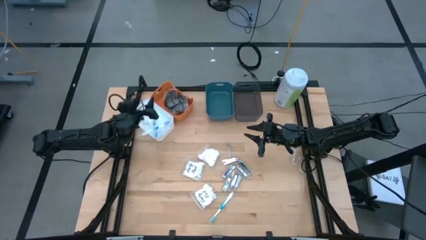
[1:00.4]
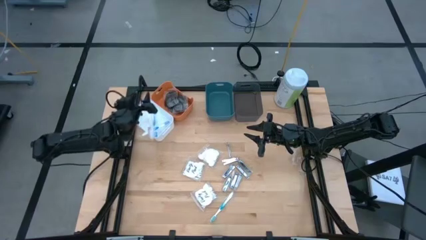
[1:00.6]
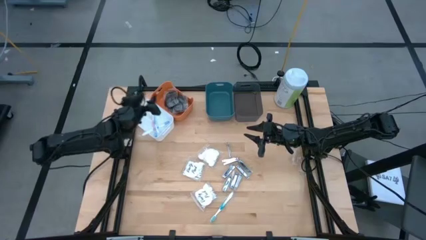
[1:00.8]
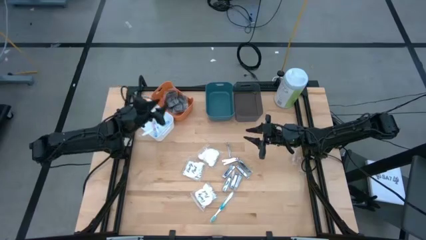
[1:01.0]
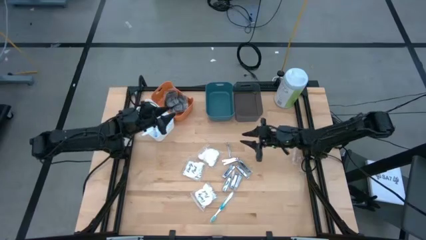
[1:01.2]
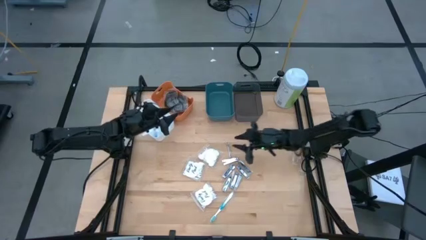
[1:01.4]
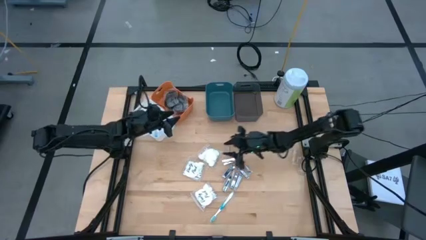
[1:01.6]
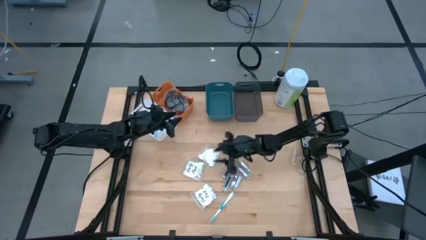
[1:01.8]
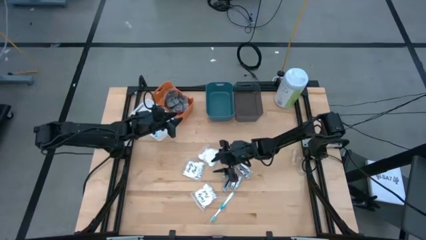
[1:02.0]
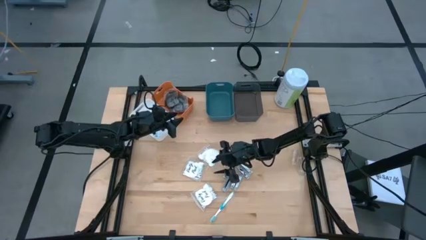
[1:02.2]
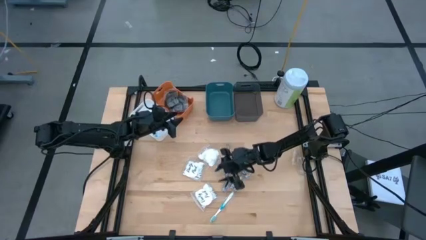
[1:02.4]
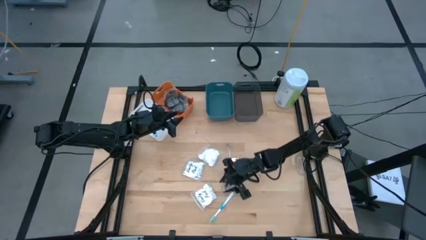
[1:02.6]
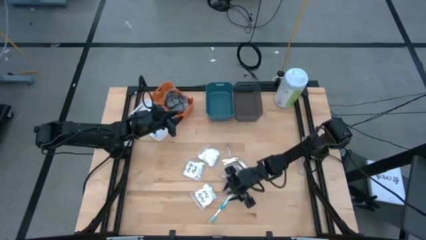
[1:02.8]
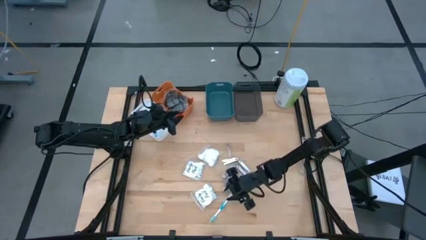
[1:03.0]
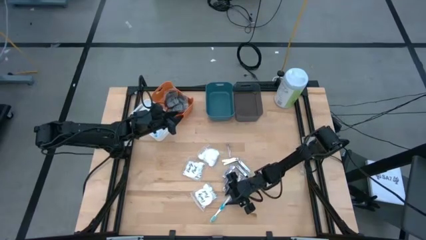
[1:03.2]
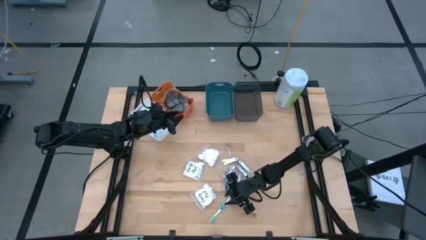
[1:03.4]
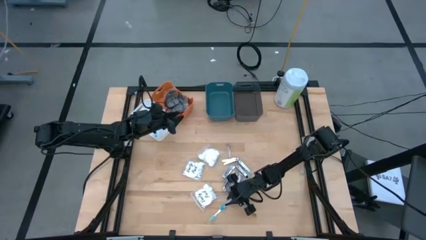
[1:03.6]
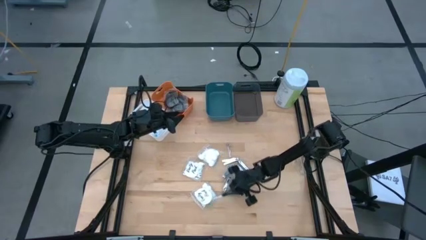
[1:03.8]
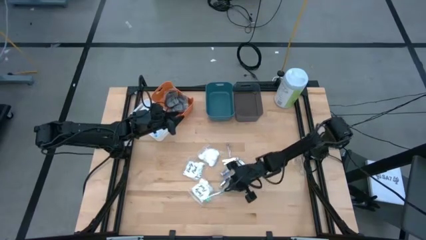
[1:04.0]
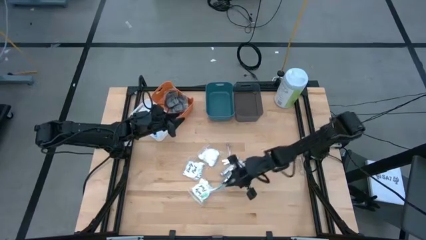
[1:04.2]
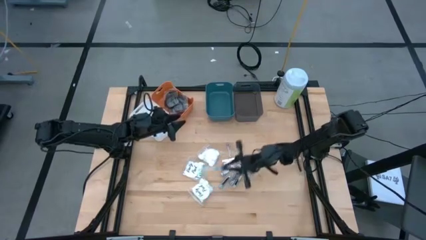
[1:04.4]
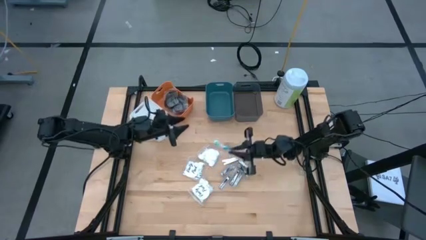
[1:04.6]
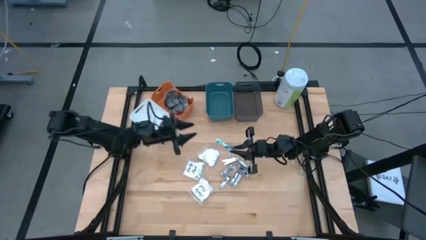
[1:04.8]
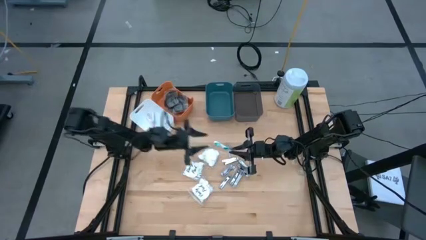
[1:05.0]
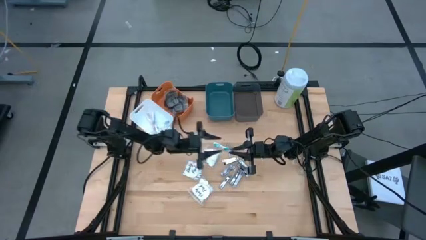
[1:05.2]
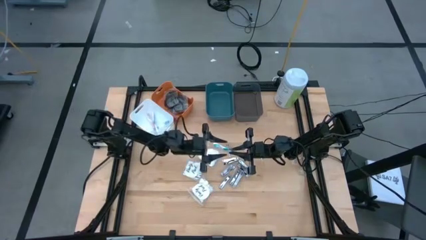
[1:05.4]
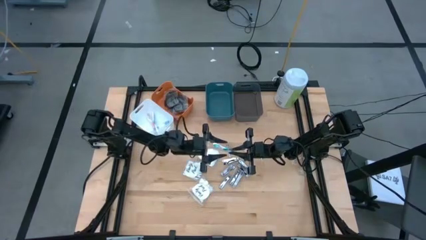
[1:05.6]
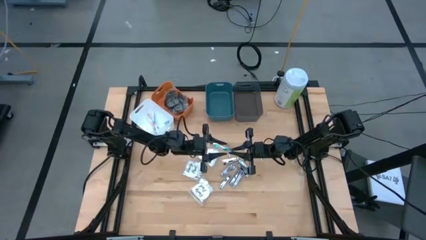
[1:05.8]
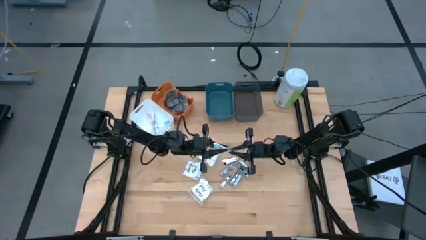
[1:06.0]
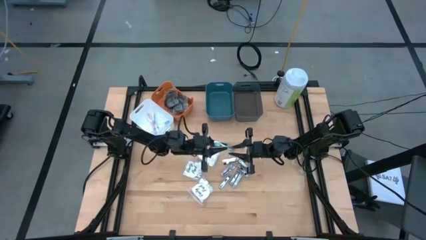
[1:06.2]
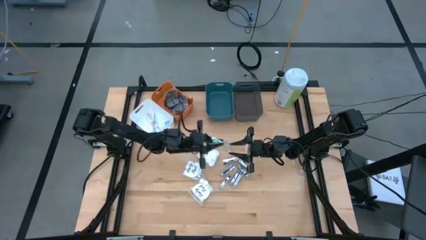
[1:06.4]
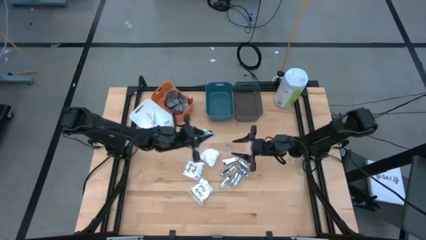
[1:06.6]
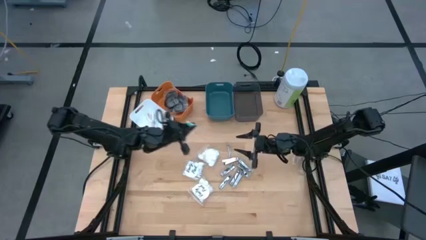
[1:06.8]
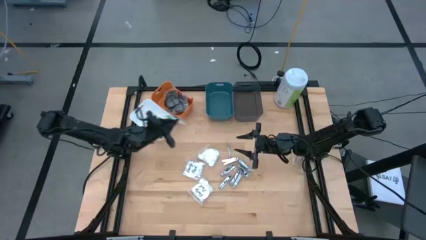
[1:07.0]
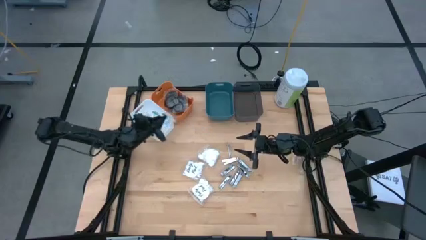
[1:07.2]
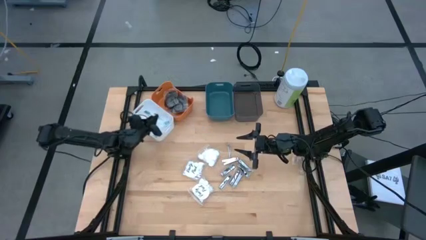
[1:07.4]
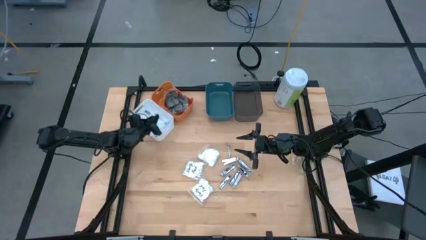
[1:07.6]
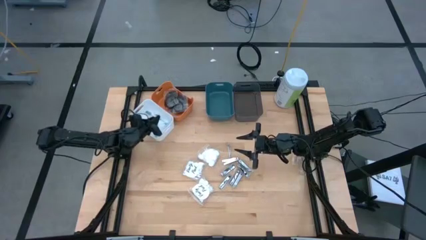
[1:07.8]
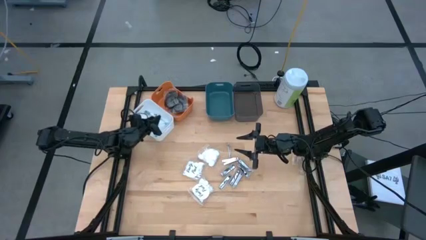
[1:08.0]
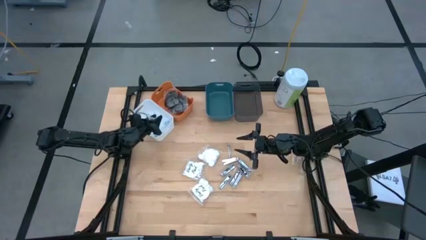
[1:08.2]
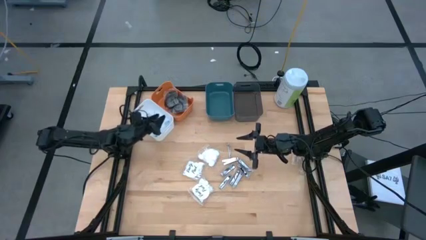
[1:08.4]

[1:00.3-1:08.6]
Task: Pick & Place Travel size toiletries
Put the green toothbrush into the white bin

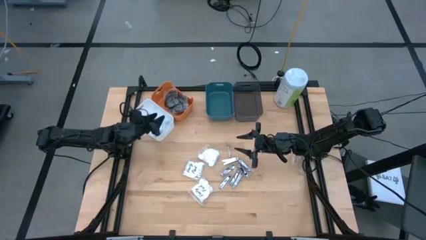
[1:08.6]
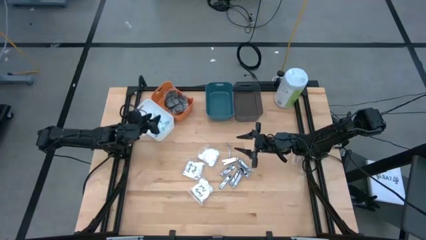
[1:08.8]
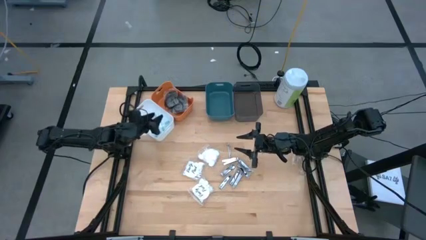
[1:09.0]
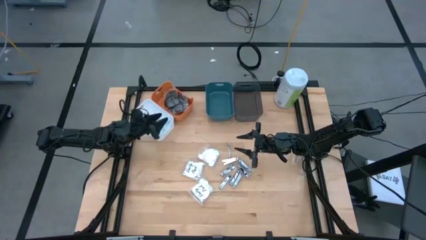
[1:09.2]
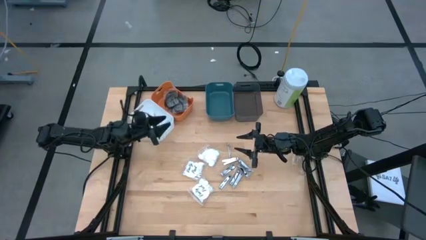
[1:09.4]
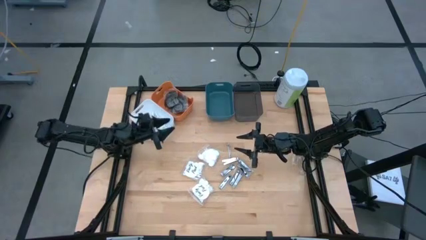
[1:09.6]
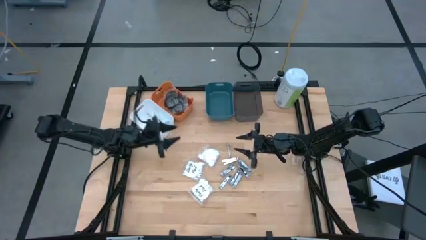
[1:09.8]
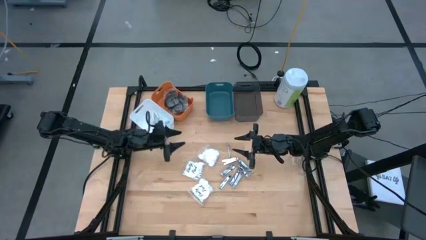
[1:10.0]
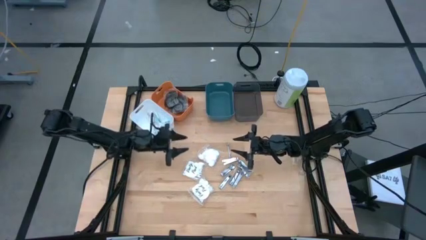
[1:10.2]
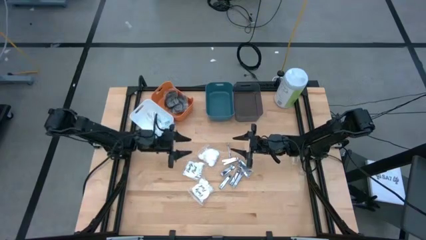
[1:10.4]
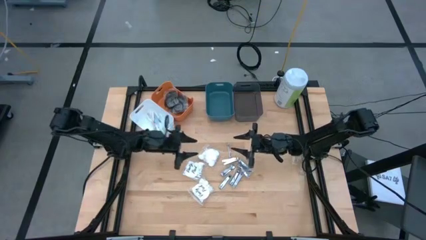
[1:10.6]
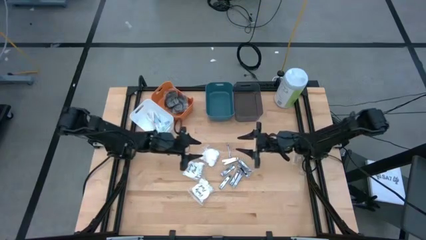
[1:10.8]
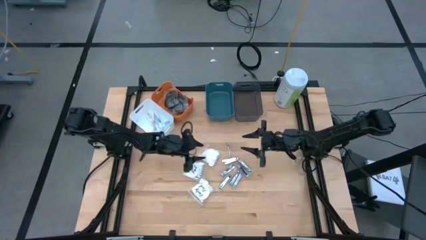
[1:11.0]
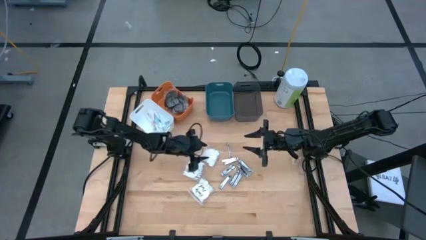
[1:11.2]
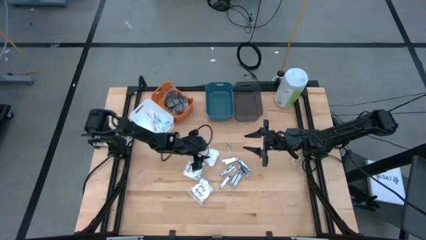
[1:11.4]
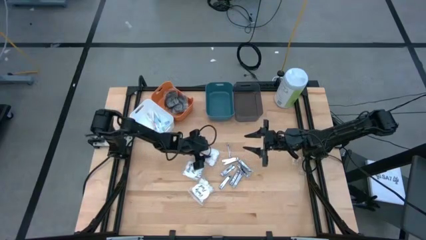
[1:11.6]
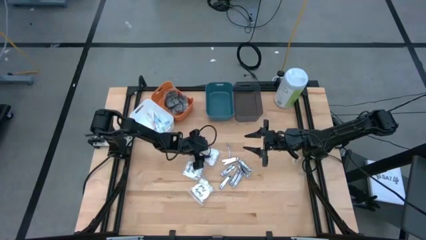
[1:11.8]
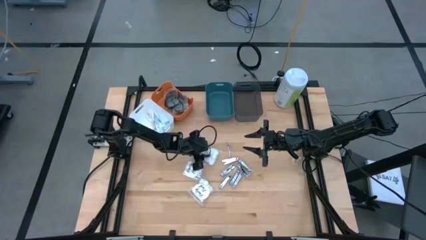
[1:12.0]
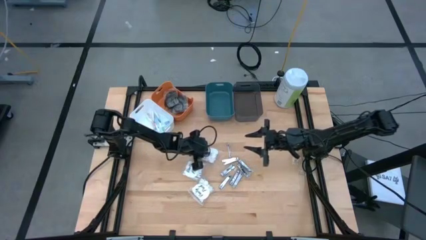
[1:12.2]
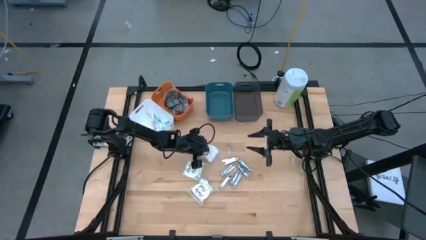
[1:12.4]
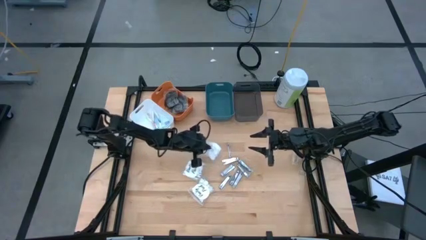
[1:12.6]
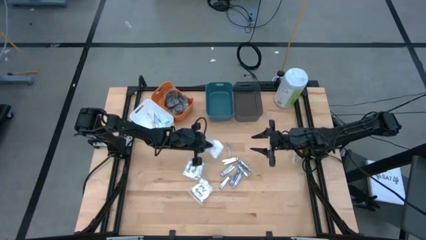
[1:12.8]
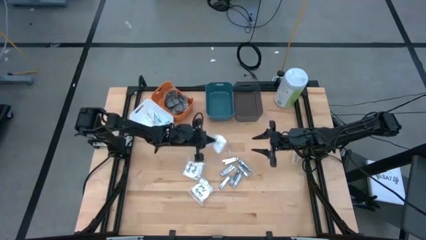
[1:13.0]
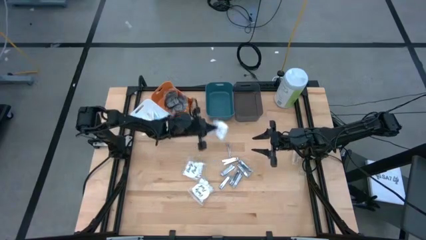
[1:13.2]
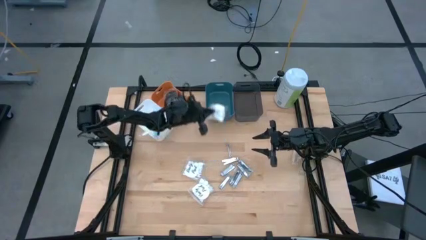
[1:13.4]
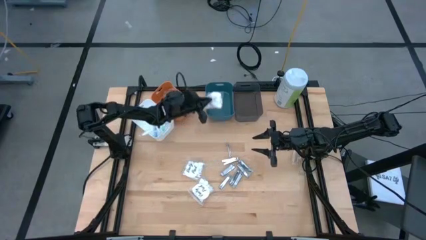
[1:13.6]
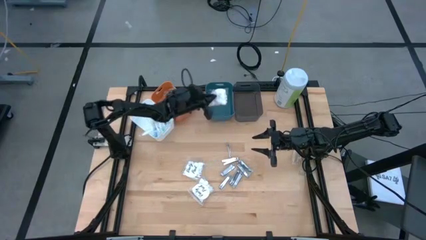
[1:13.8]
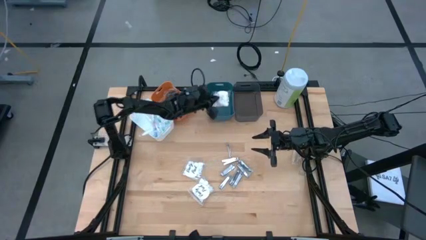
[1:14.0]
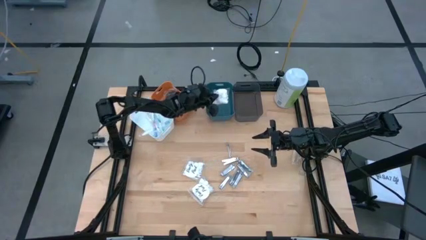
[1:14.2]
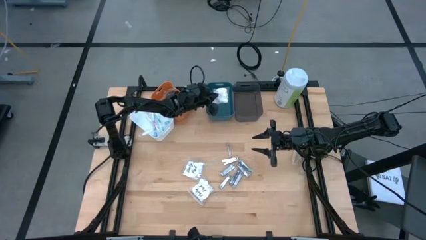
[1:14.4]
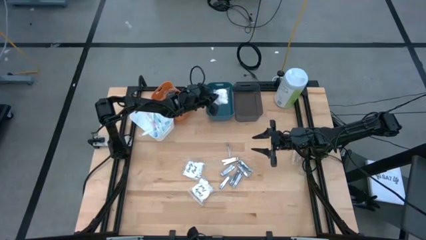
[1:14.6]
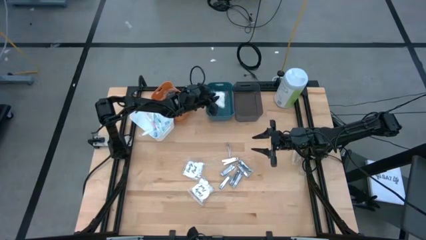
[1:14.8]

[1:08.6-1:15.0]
Put the top white cotton packet into the green bin

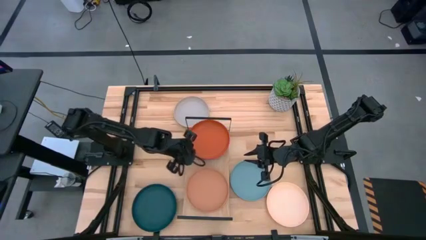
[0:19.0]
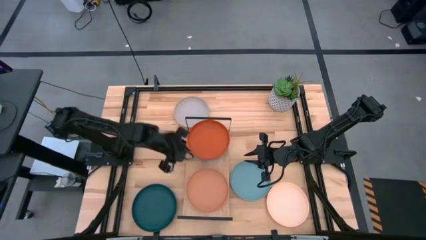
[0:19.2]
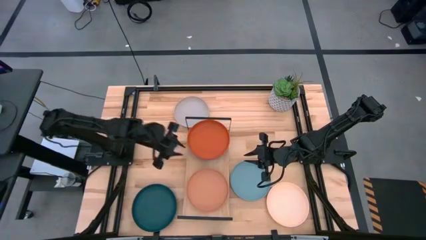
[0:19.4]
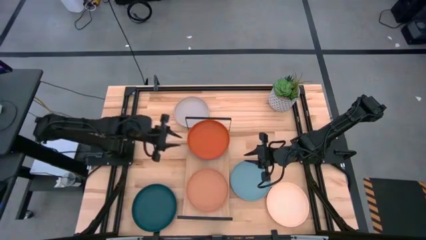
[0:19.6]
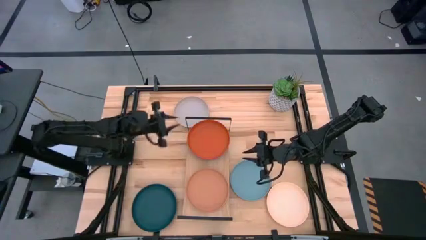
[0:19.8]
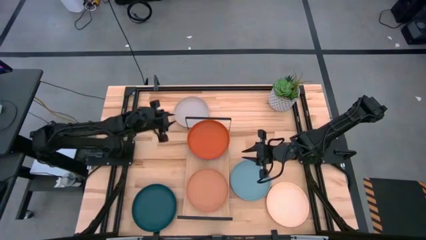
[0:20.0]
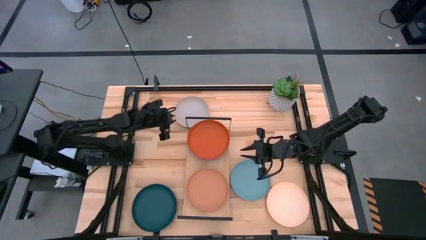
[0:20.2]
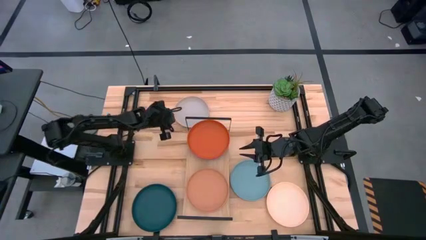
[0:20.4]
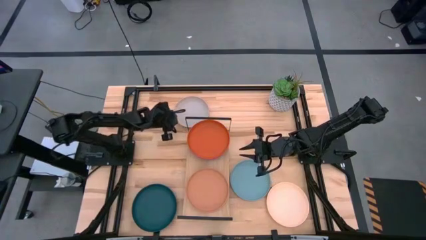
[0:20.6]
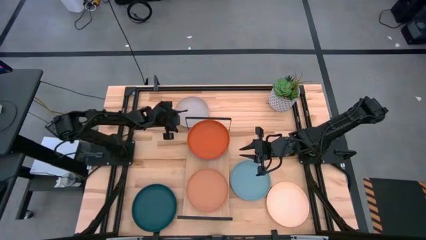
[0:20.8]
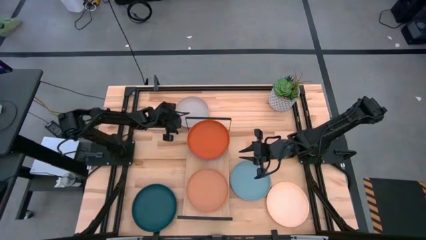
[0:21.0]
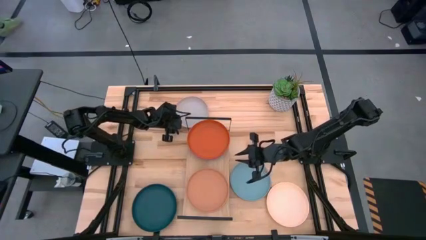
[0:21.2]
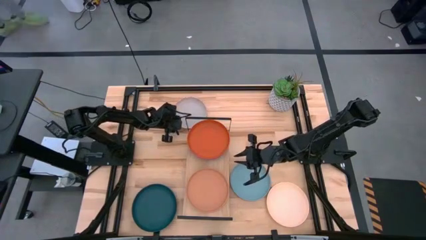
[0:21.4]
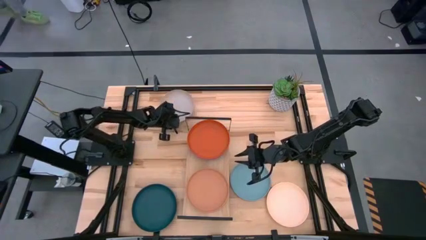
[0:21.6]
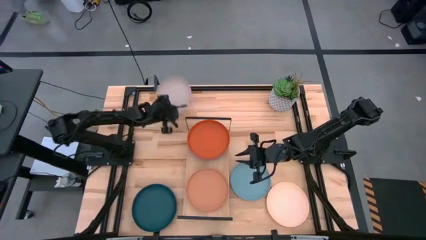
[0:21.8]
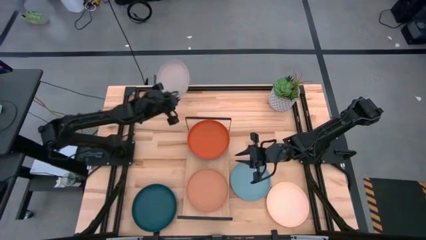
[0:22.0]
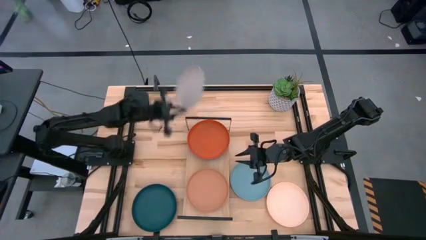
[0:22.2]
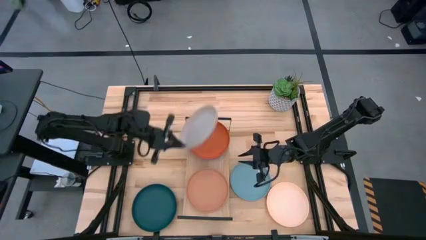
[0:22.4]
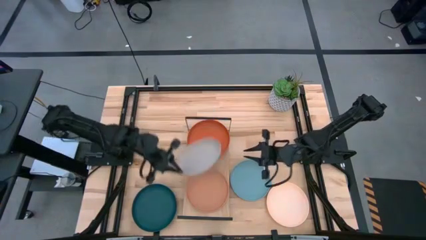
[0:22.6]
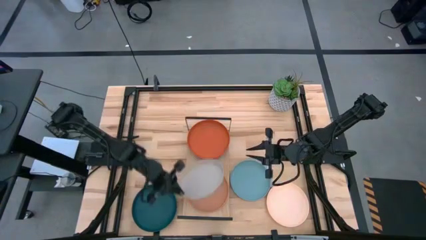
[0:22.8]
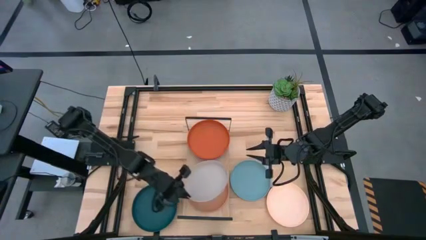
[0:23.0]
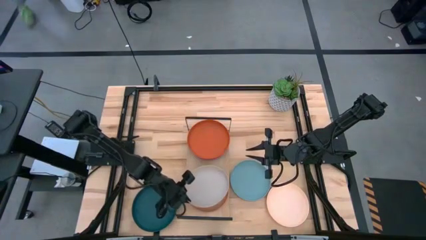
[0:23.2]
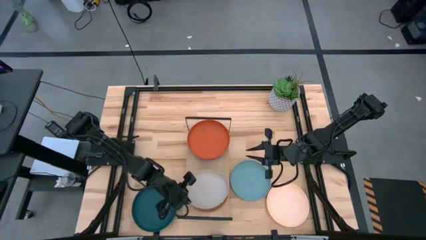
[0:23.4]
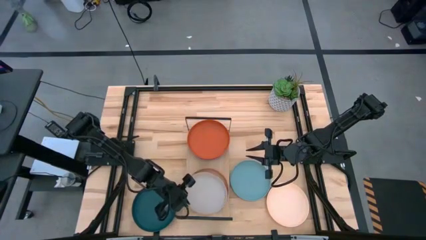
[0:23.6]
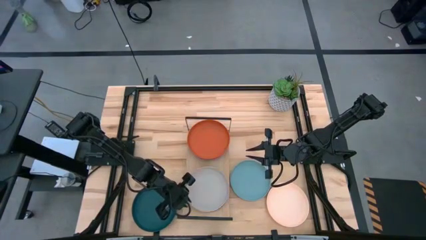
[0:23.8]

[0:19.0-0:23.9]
Task: Place and stack plates onto a shelf
Stack the gray plate on top of the light brown plate on the shelf
